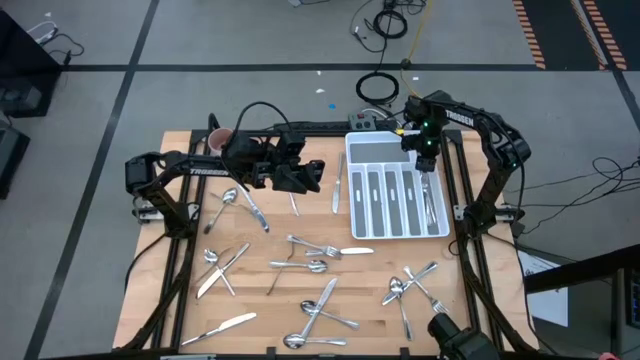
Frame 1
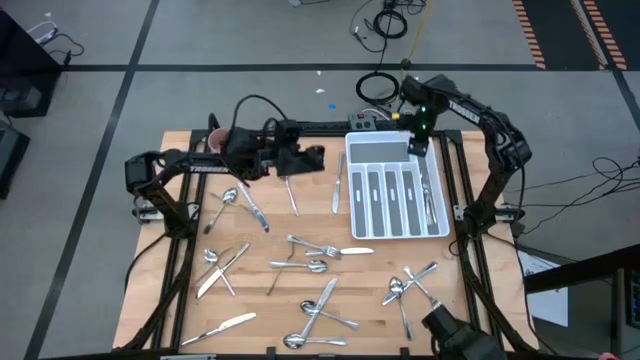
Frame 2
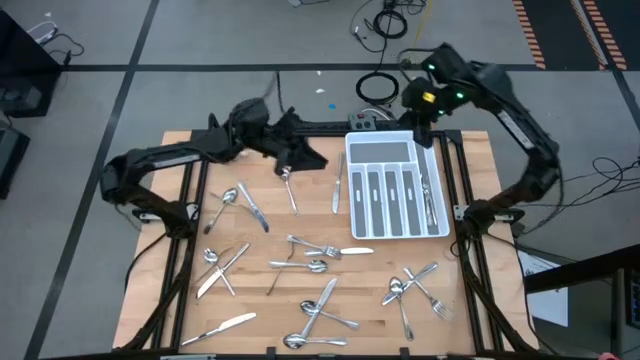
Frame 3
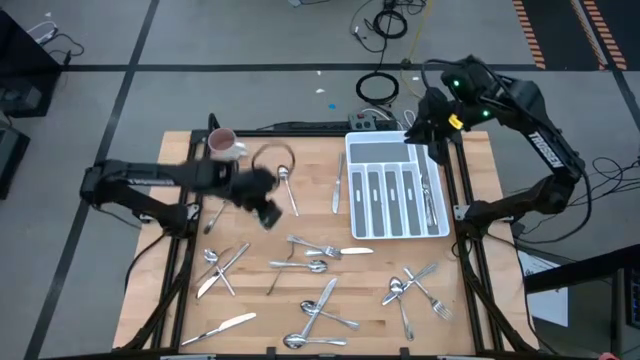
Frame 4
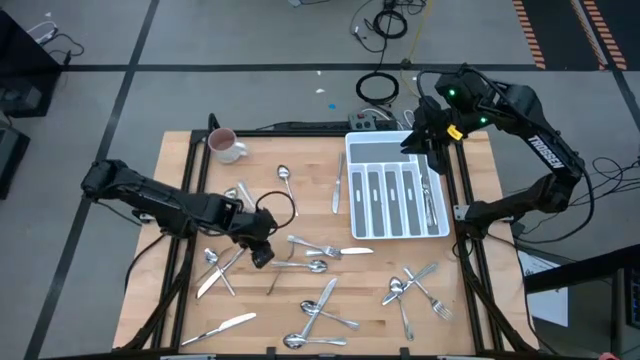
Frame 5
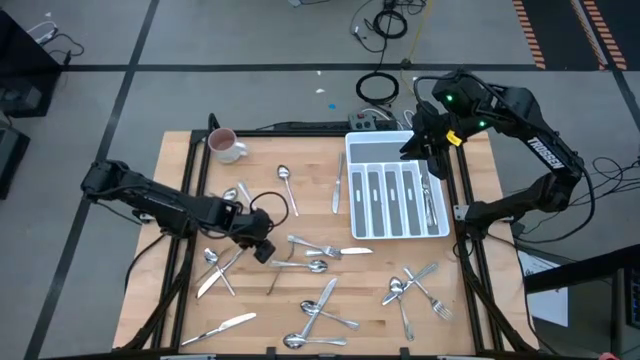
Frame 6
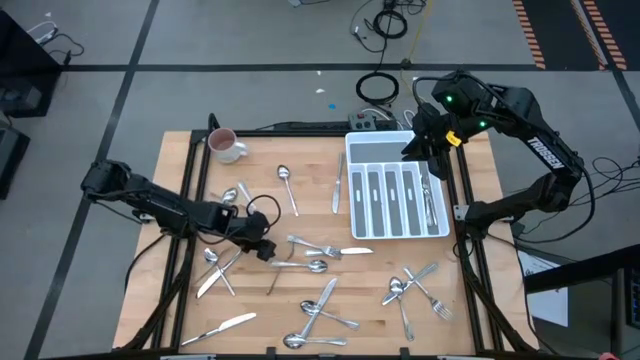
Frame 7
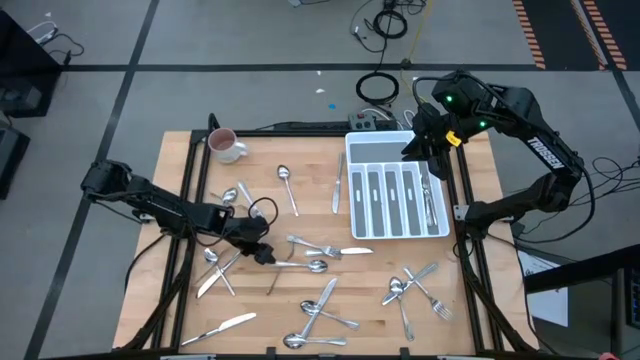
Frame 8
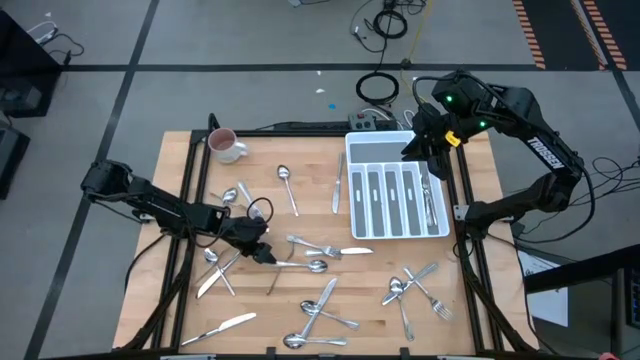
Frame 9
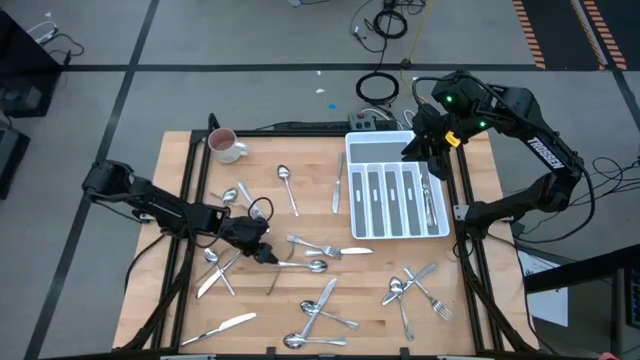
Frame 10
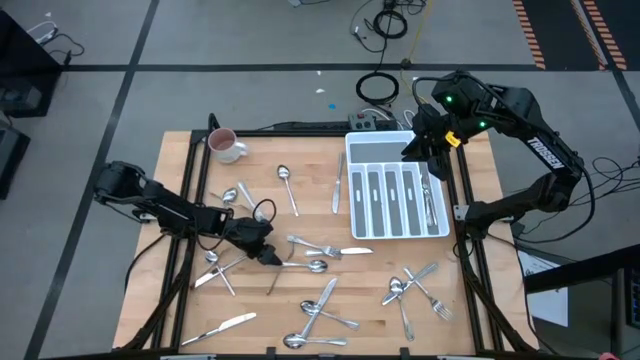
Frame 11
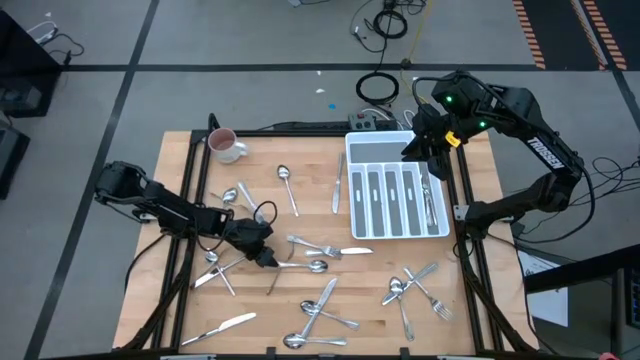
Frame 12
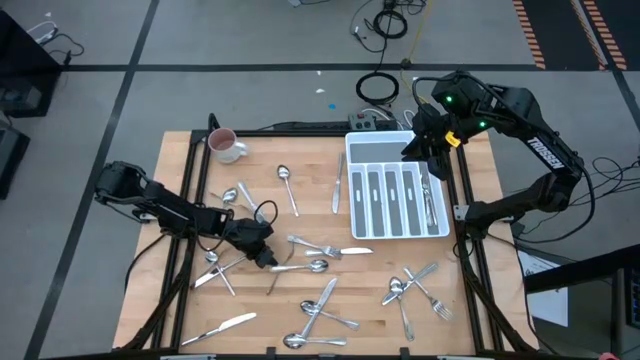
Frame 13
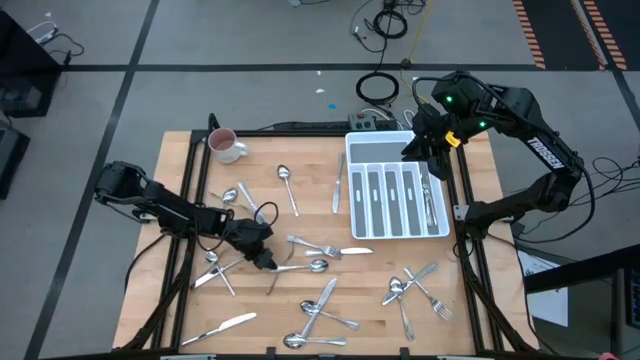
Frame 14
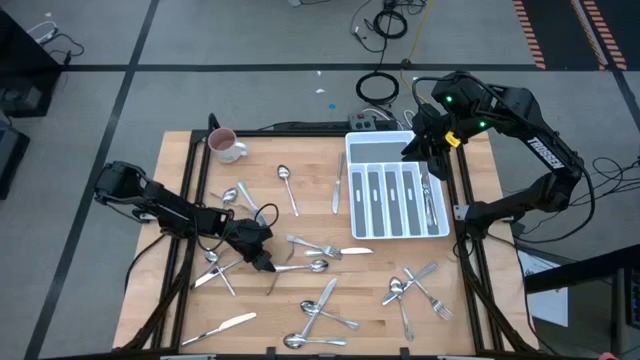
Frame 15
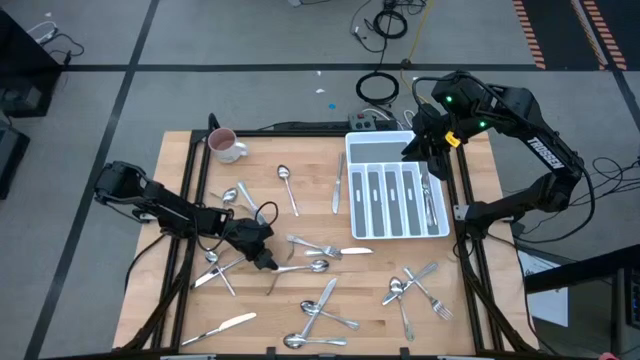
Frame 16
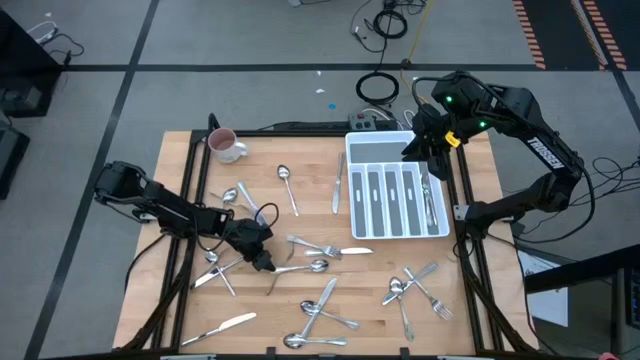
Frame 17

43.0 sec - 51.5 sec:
Task: Sort silverware
Put the spoon in the middle section of the silverware tray

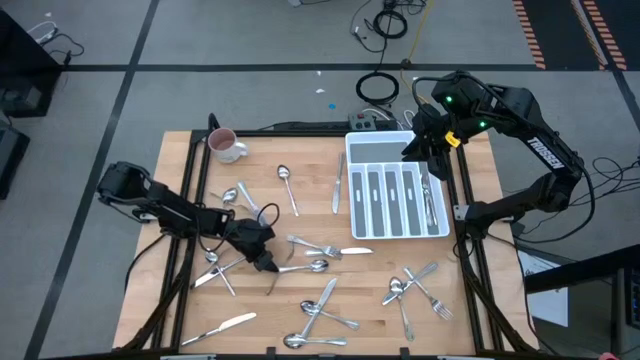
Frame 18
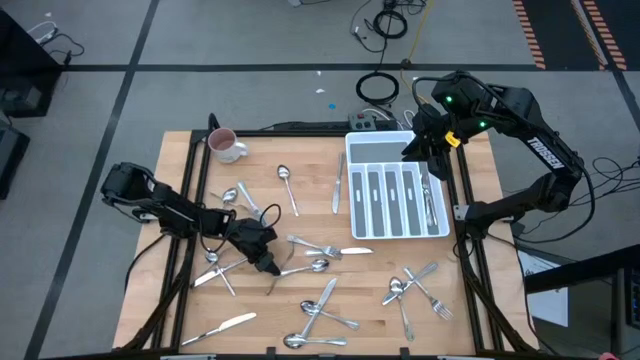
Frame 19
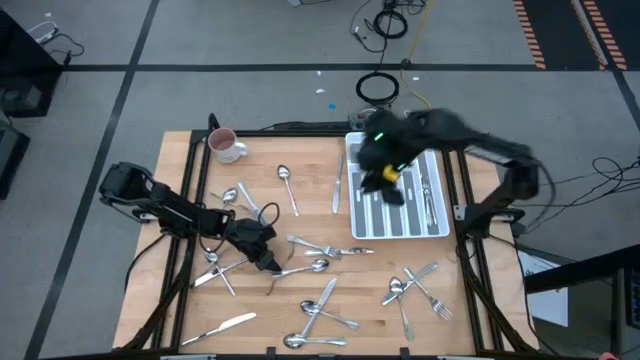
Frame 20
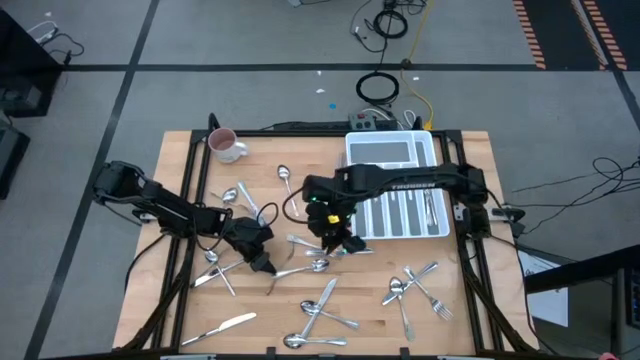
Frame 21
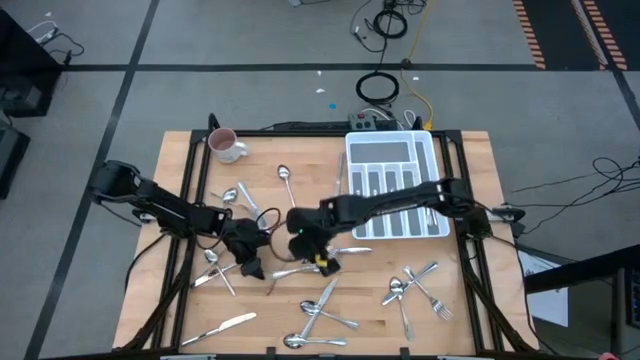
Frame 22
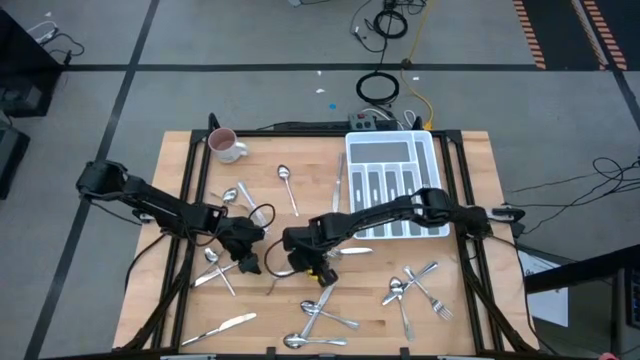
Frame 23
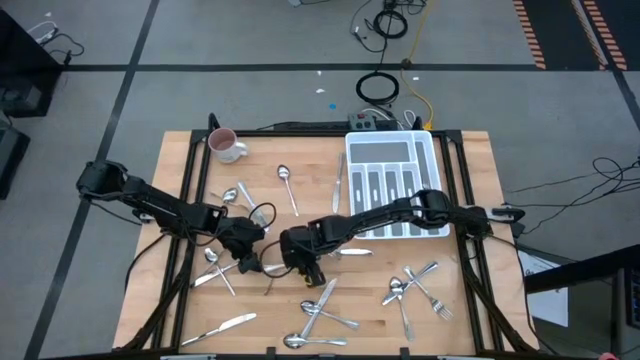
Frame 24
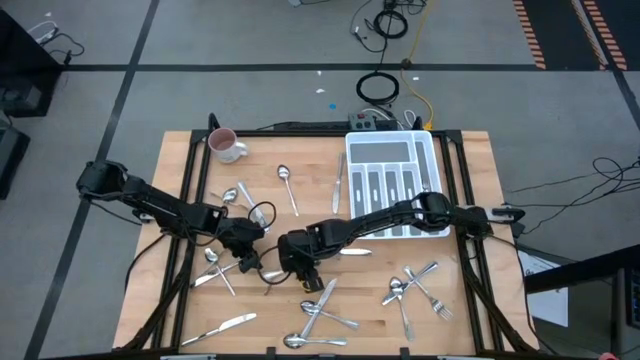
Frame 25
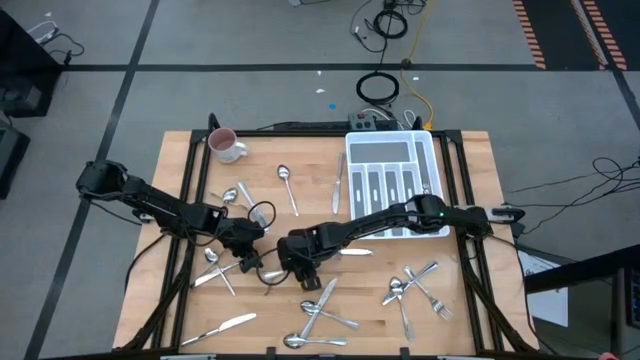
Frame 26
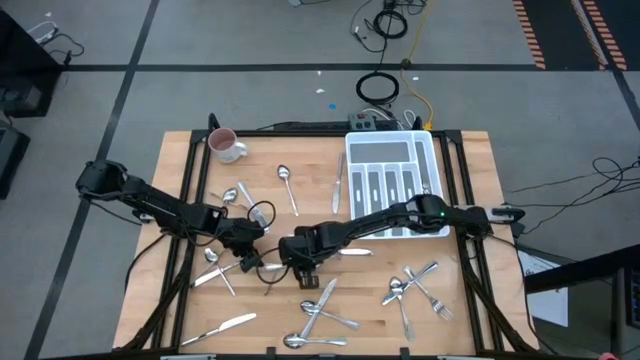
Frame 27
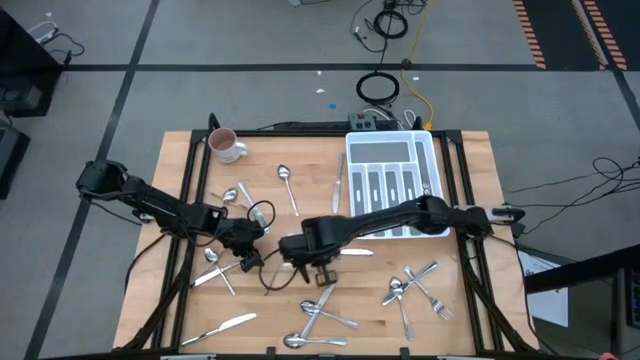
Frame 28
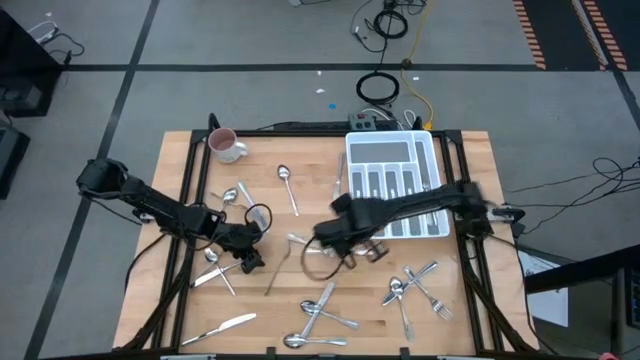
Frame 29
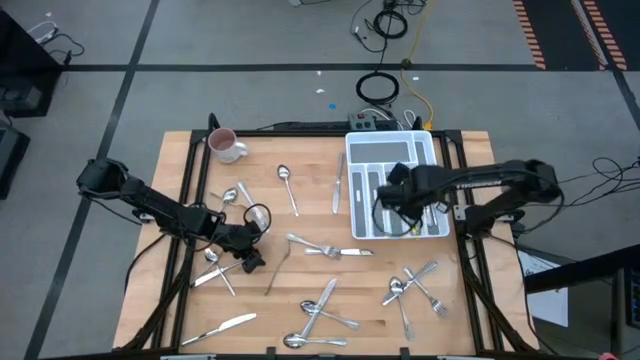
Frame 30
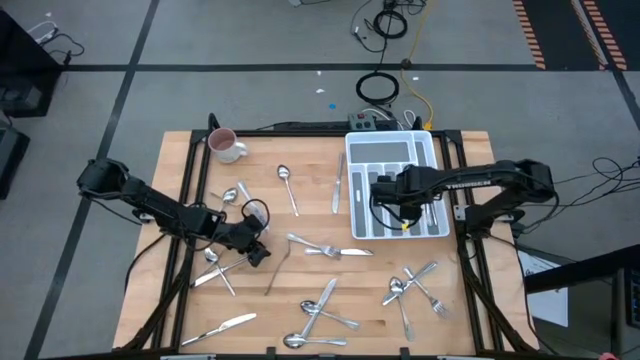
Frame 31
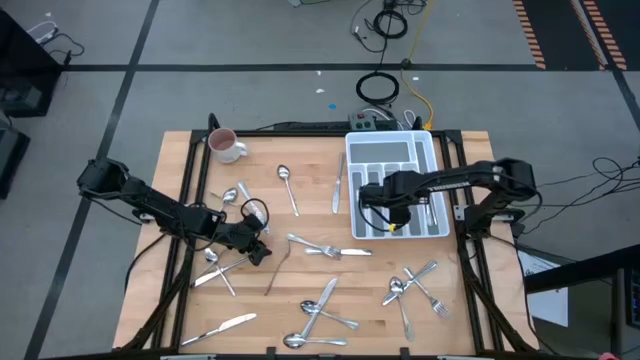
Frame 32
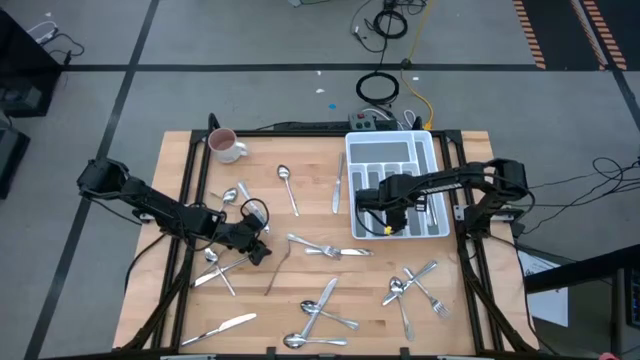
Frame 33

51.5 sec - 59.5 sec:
Put the spoon in the middle section of the silverware tray

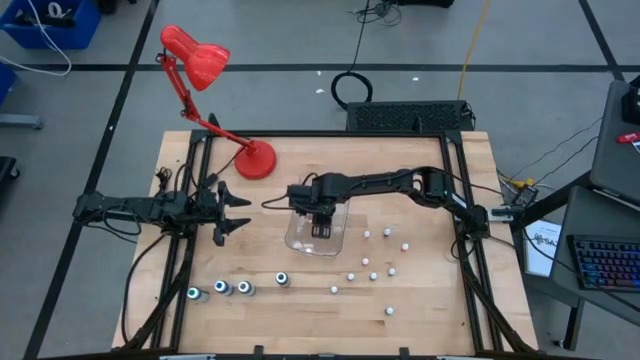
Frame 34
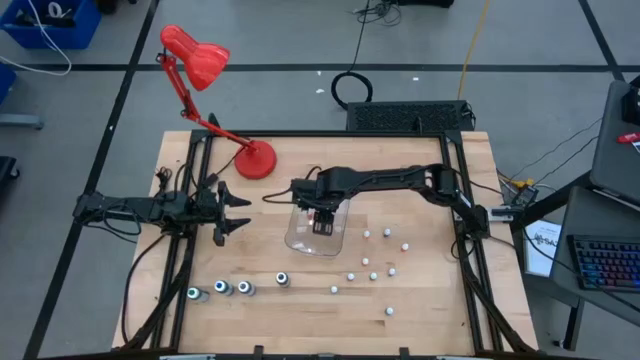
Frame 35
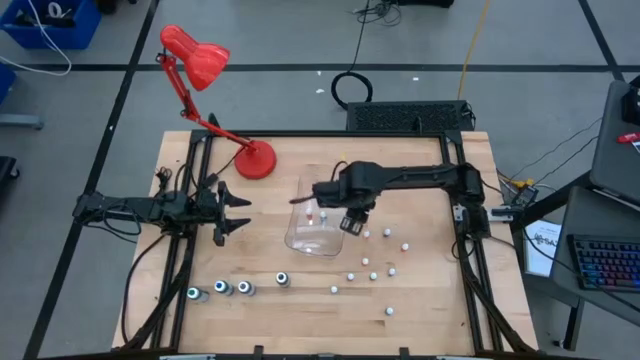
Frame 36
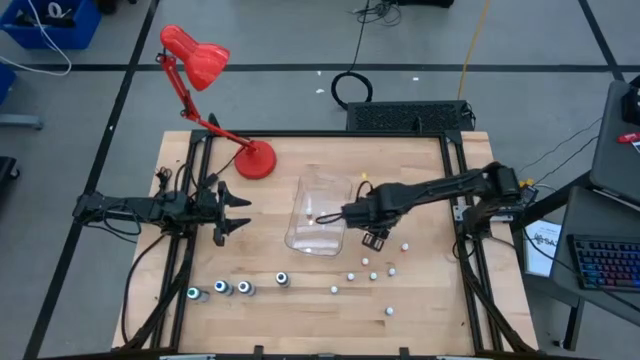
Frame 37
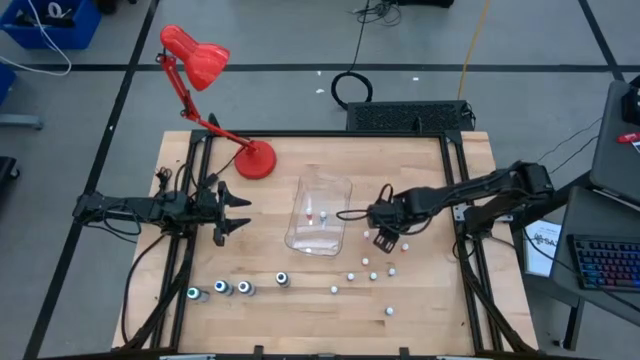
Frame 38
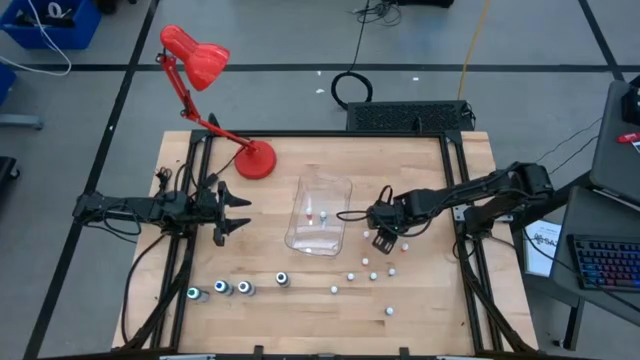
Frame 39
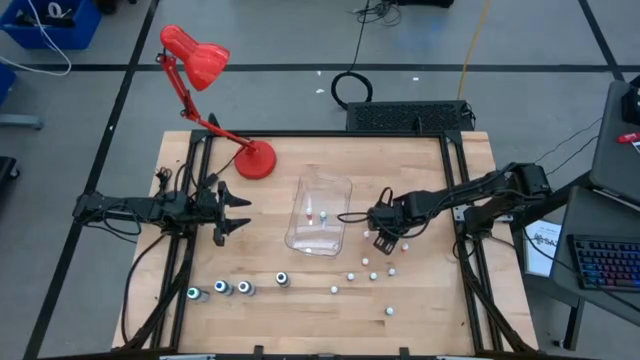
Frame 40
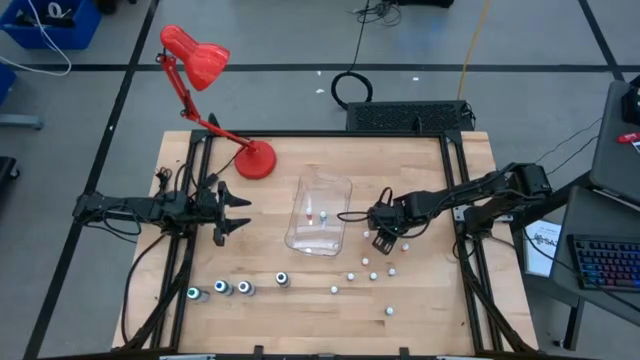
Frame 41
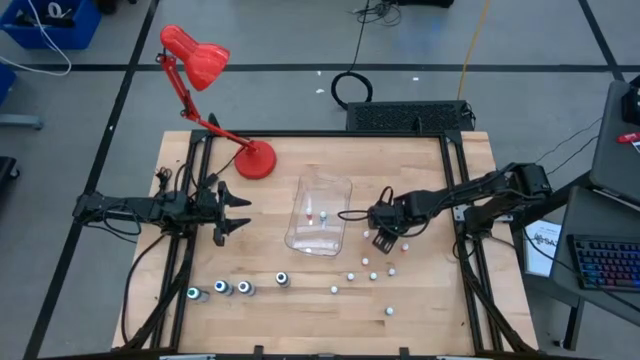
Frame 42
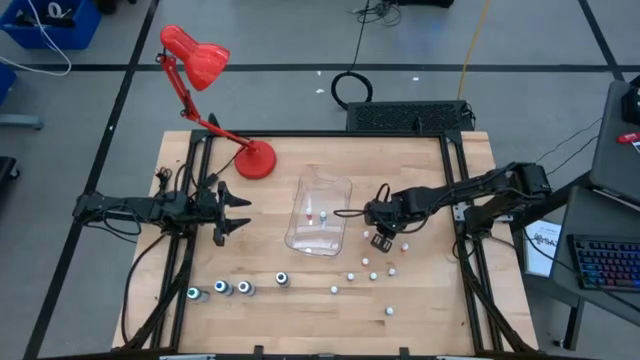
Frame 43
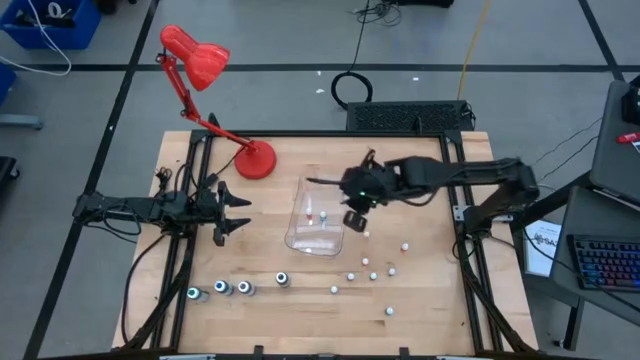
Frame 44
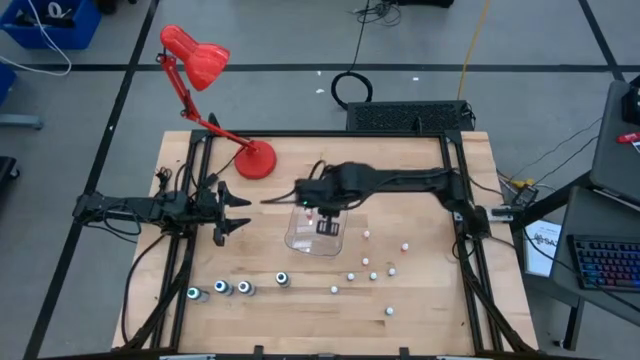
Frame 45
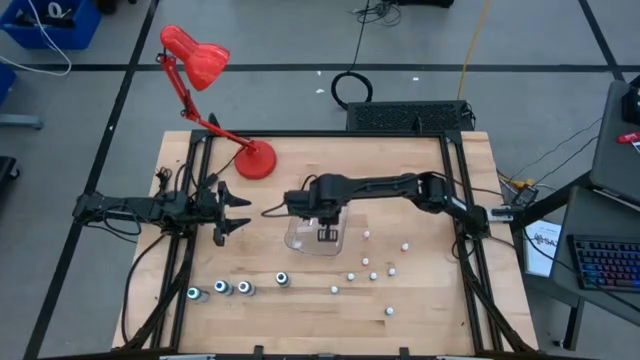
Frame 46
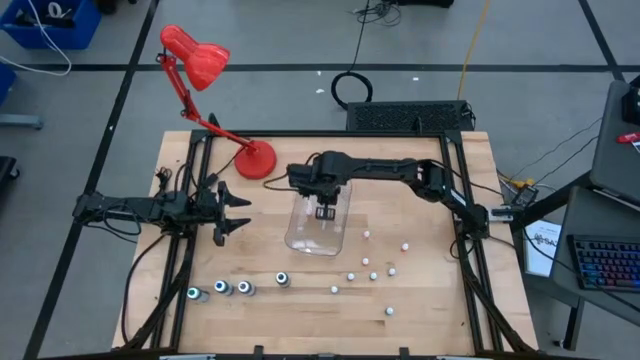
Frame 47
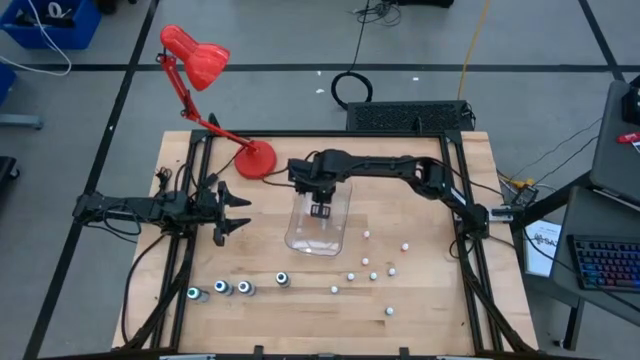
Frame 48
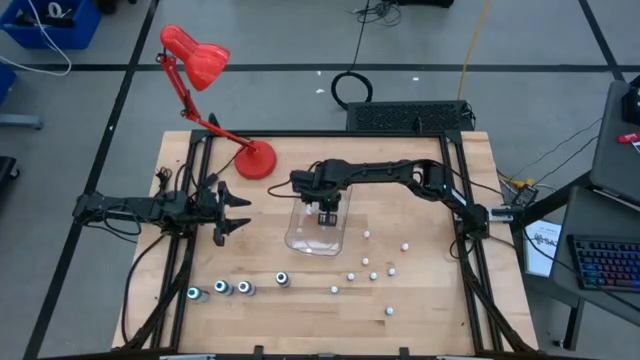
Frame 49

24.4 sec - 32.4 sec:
Task: Pick & Place food coloring
Put the small purple food coloring bottle into the transparent bin
